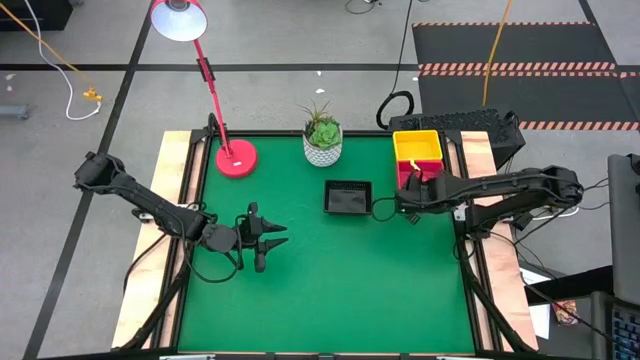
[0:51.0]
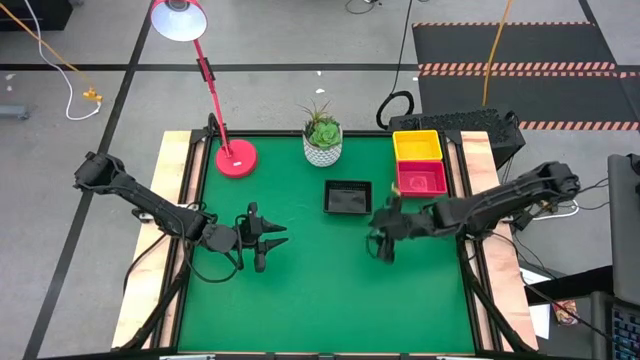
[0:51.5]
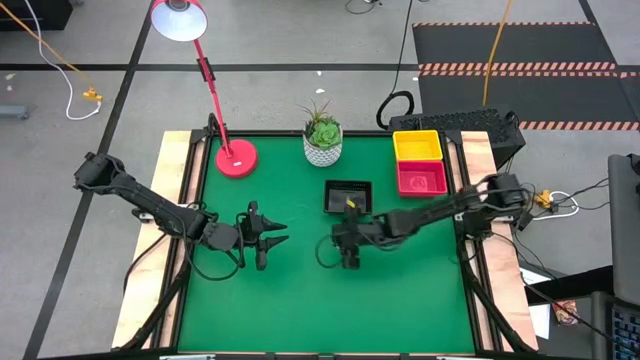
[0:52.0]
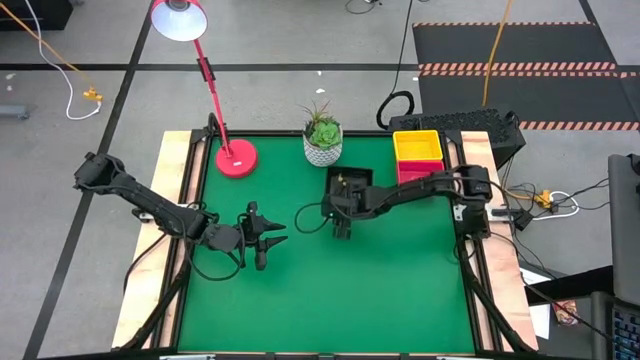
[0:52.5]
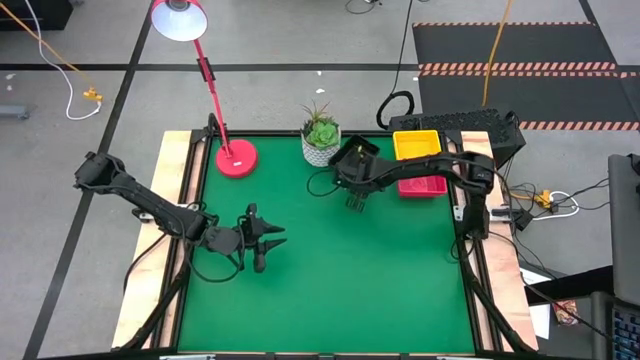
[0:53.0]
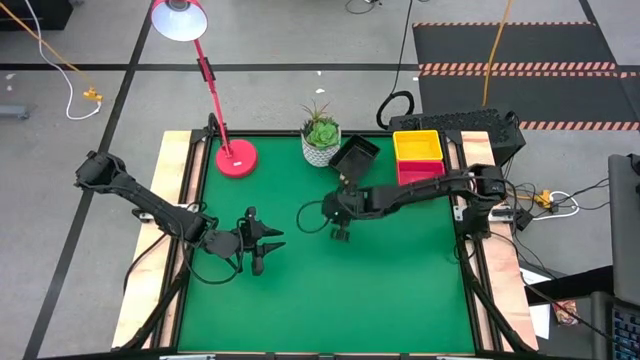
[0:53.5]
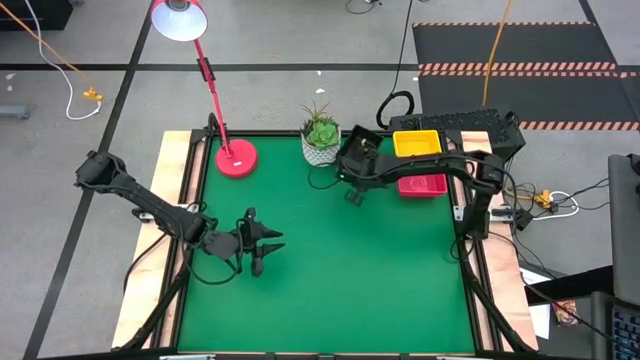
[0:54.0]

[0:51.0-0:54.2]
Move the stacked black bins to the top of the table

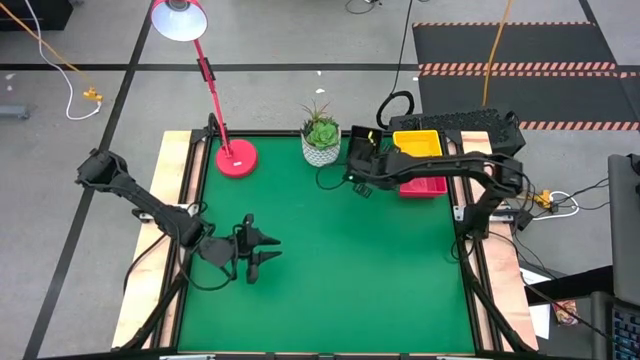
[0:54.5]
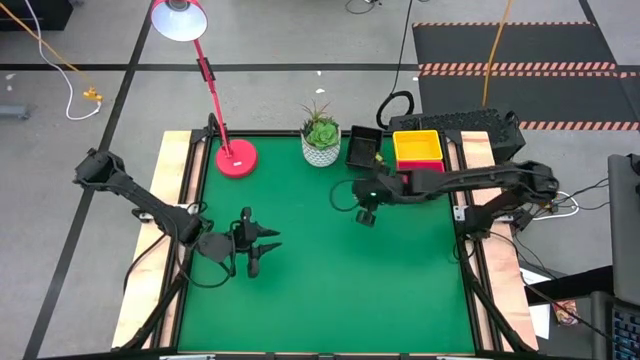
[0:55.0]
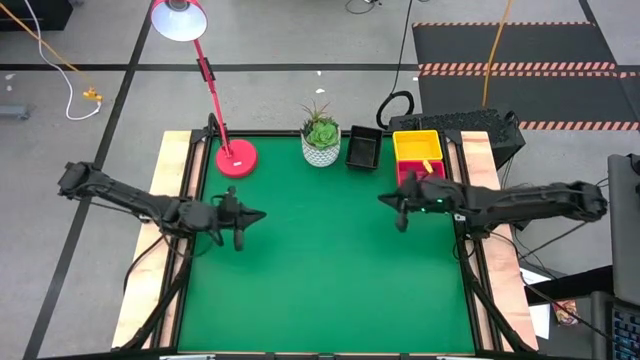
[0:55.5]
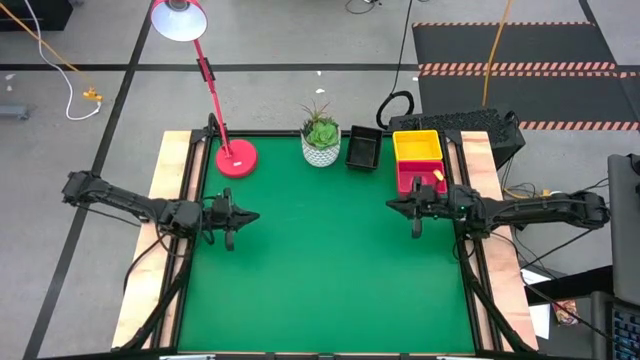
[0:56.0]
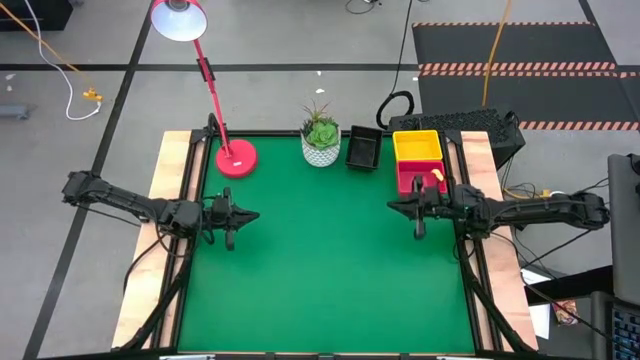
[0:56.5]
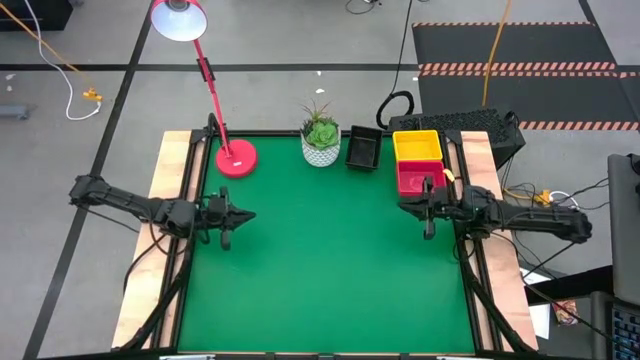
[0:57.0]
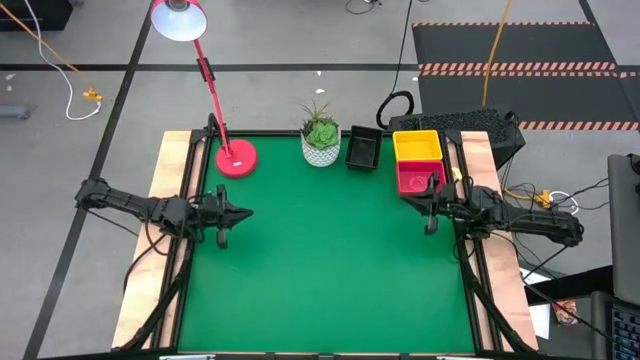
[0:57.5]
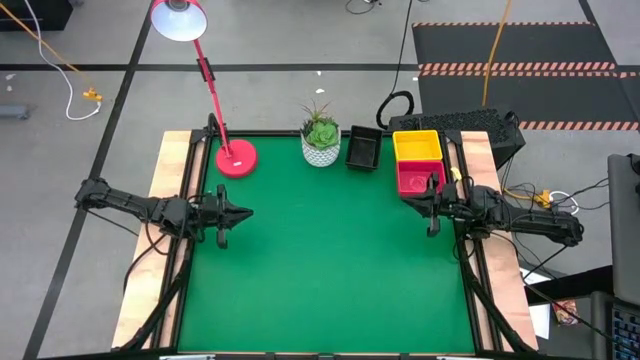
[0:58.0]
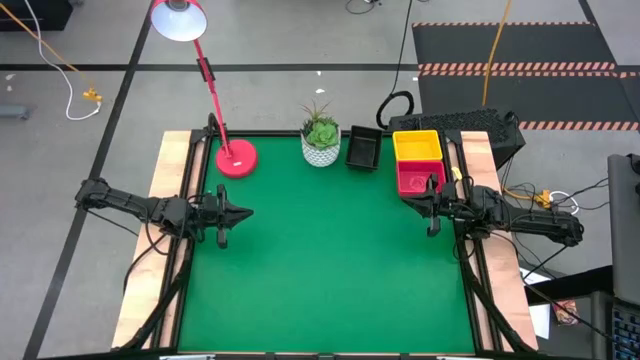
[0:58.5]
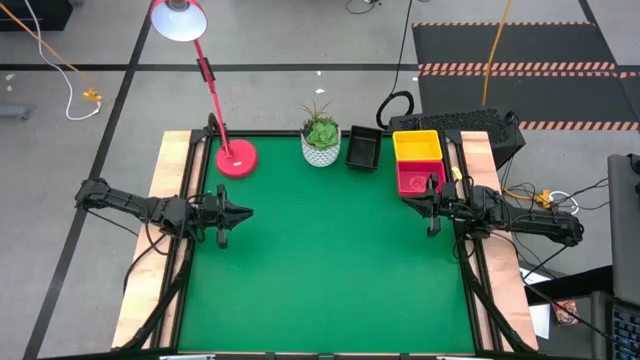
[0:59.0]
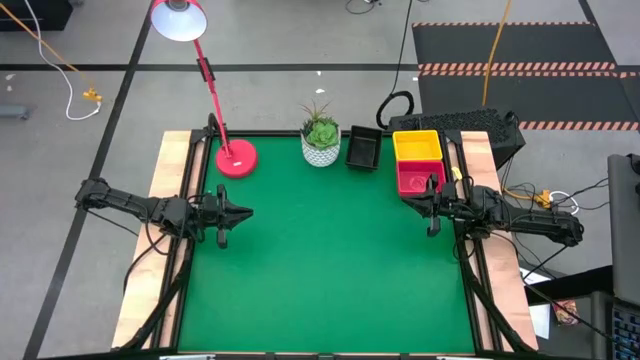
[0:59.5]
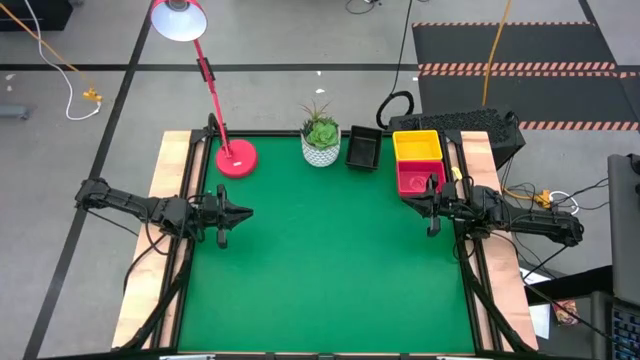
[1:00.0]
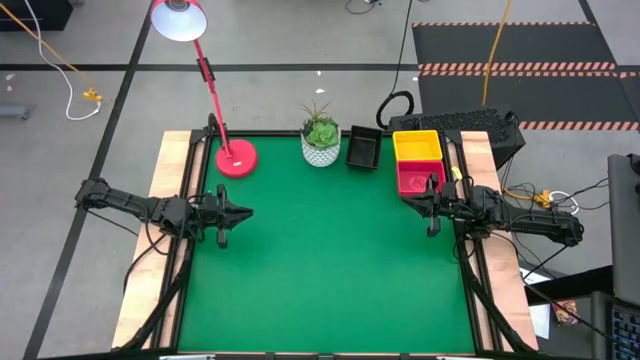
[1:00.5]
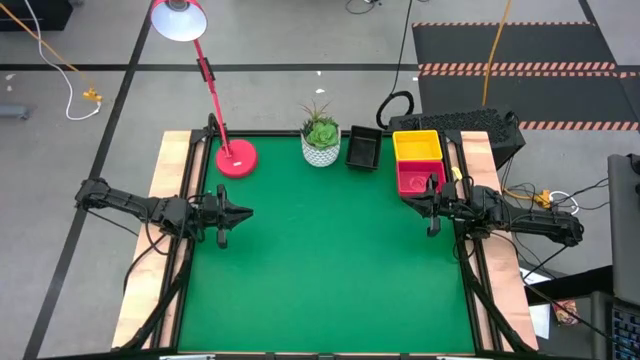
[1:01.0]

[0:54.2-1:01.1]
Return to Home Position

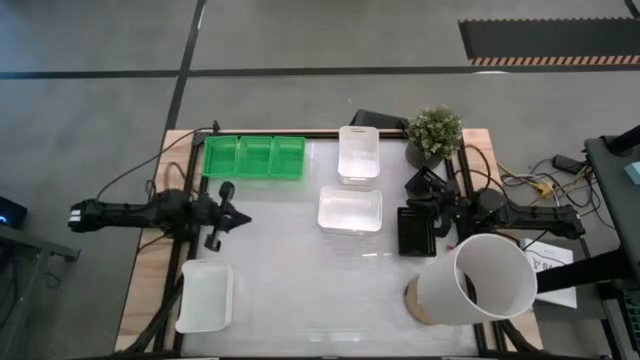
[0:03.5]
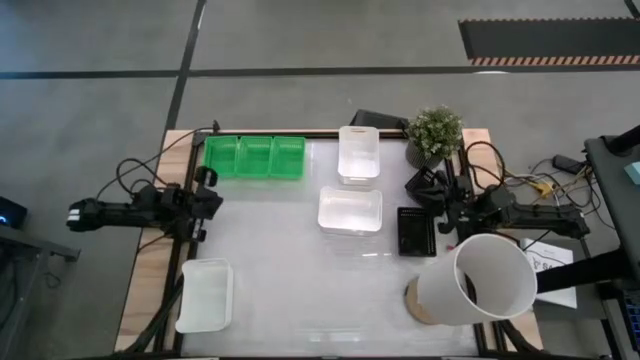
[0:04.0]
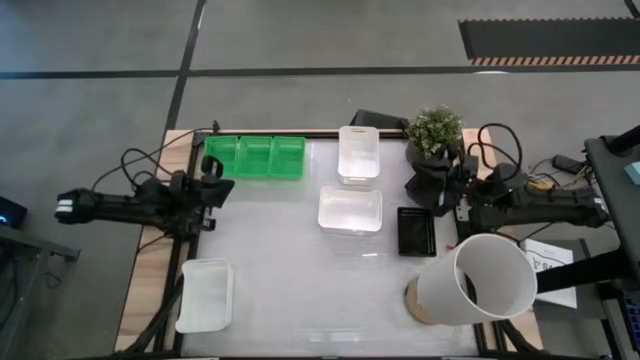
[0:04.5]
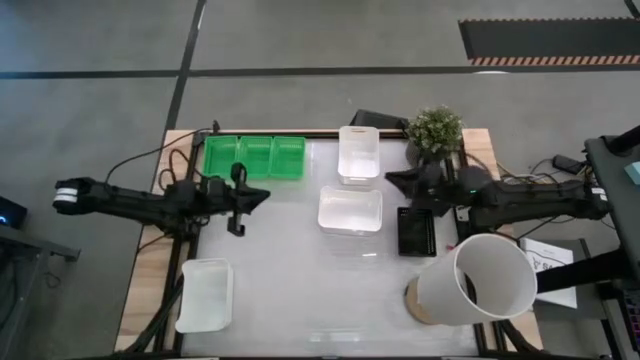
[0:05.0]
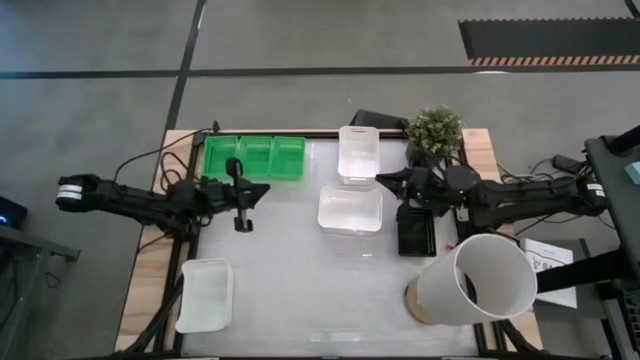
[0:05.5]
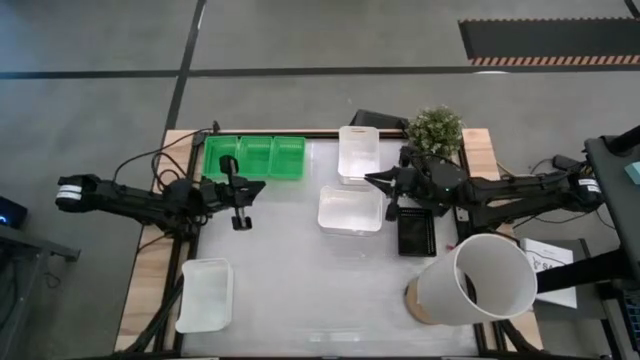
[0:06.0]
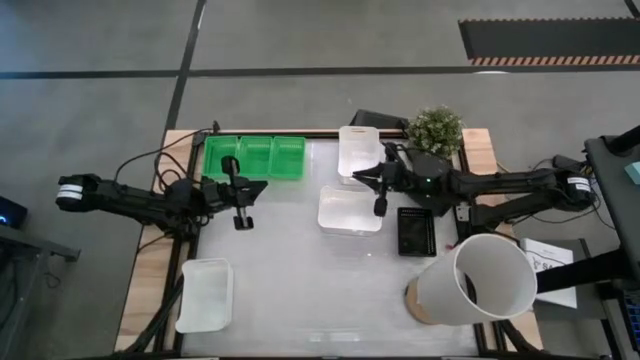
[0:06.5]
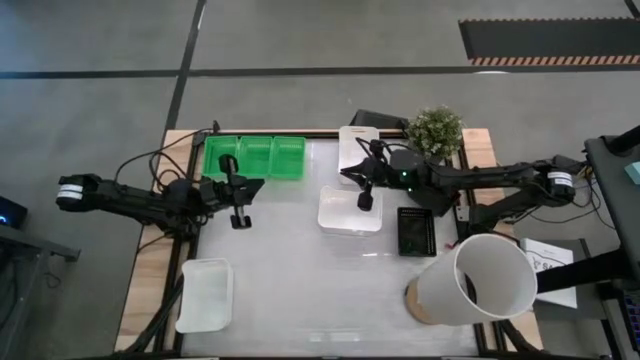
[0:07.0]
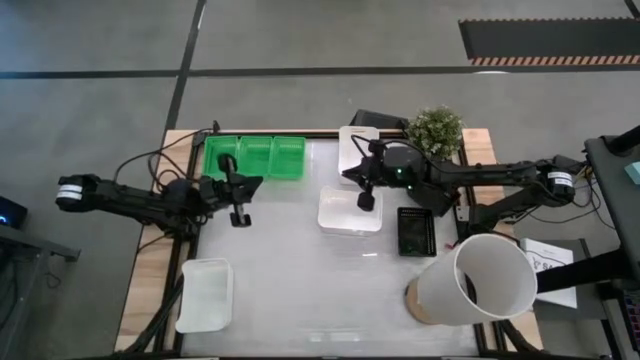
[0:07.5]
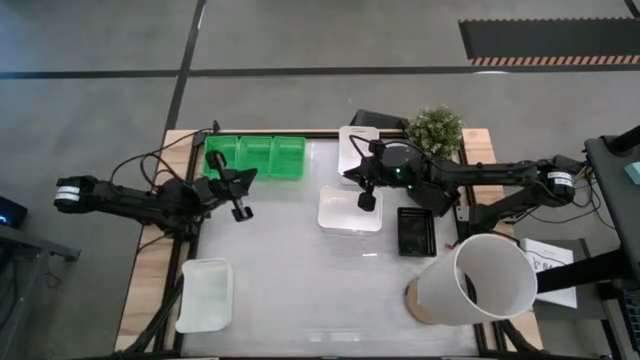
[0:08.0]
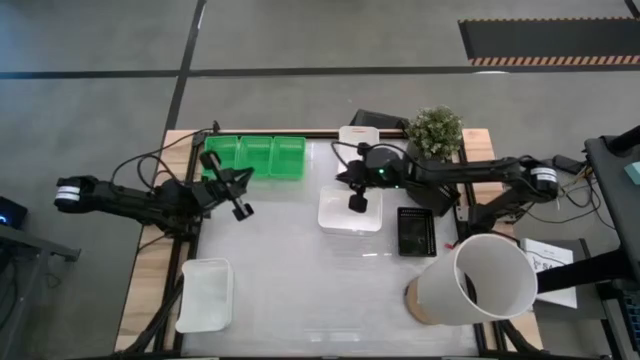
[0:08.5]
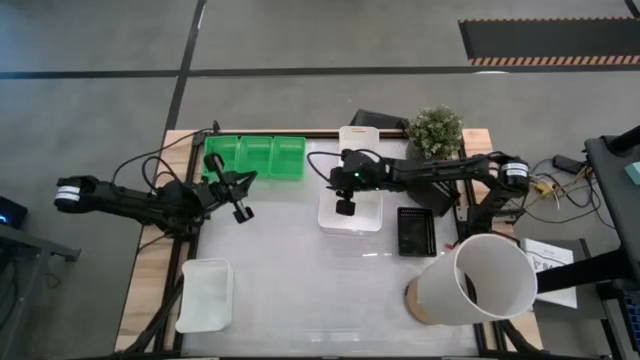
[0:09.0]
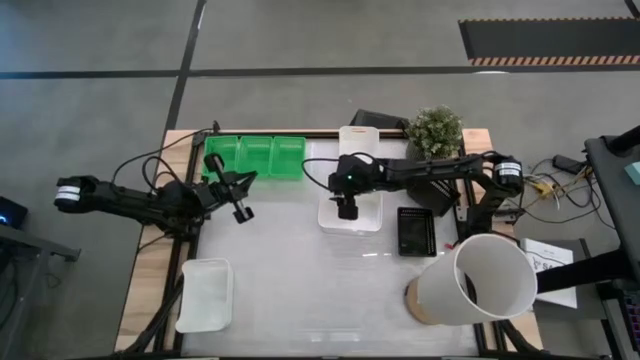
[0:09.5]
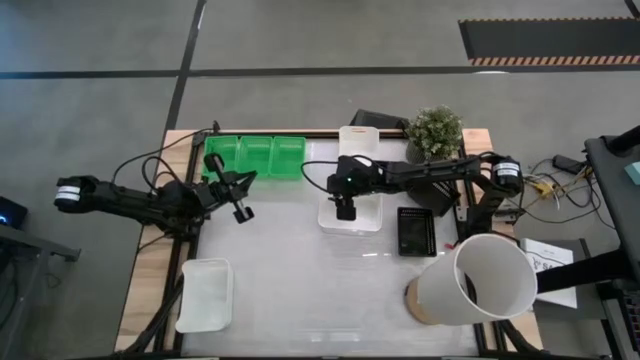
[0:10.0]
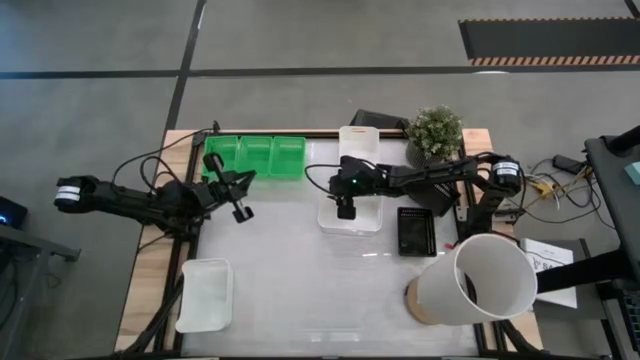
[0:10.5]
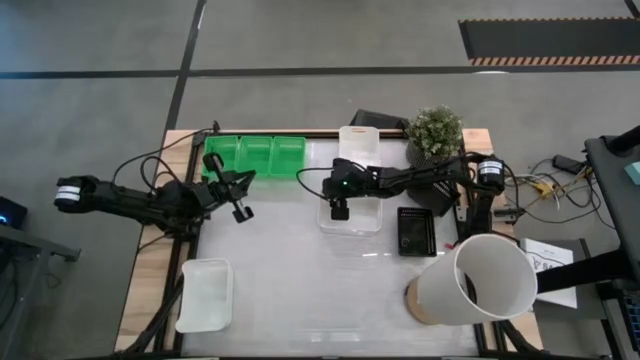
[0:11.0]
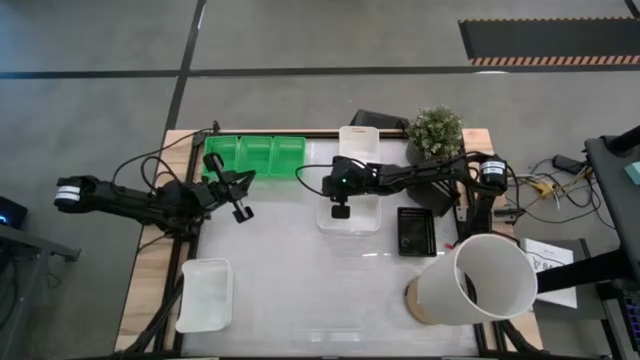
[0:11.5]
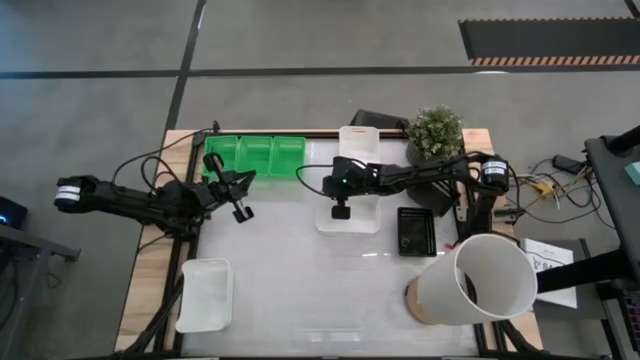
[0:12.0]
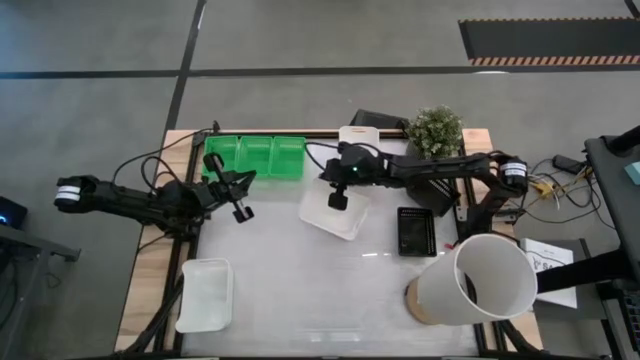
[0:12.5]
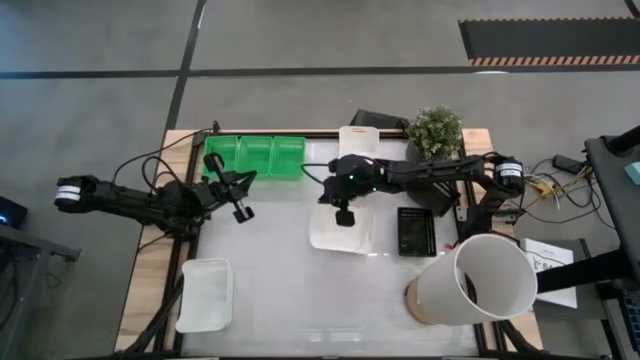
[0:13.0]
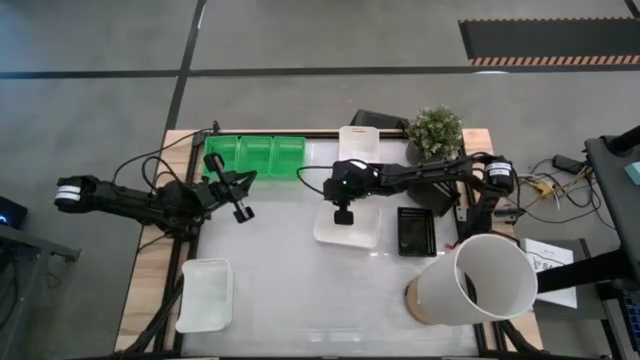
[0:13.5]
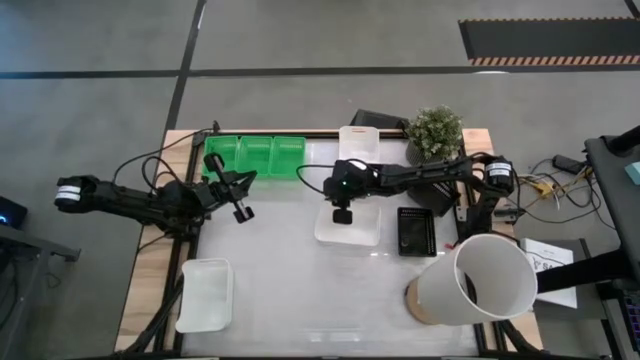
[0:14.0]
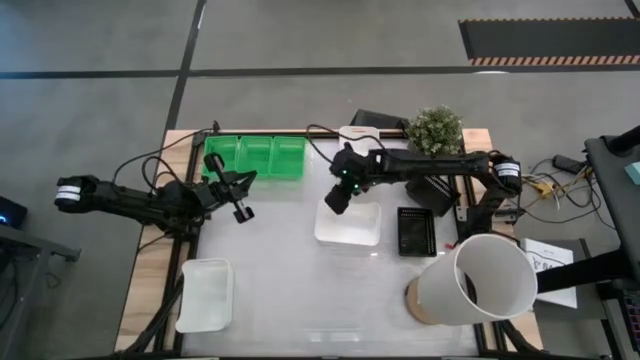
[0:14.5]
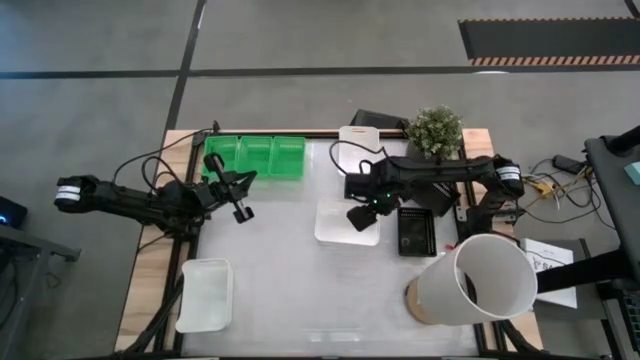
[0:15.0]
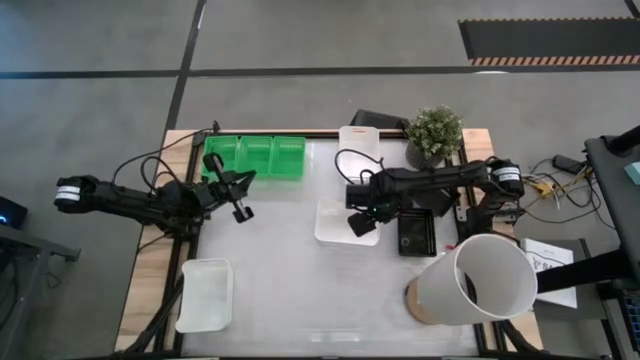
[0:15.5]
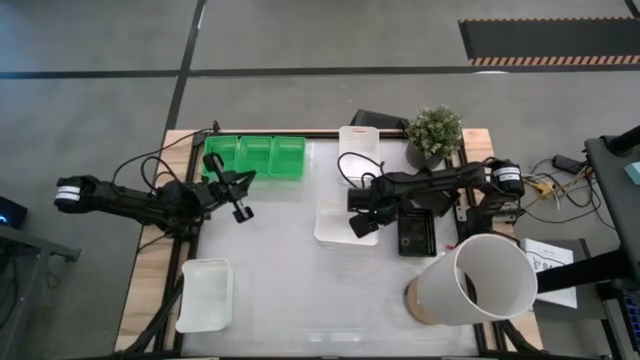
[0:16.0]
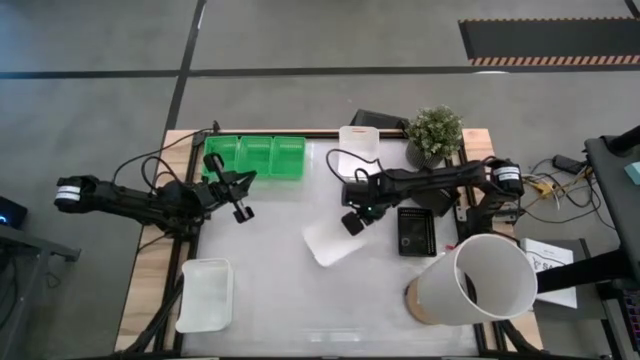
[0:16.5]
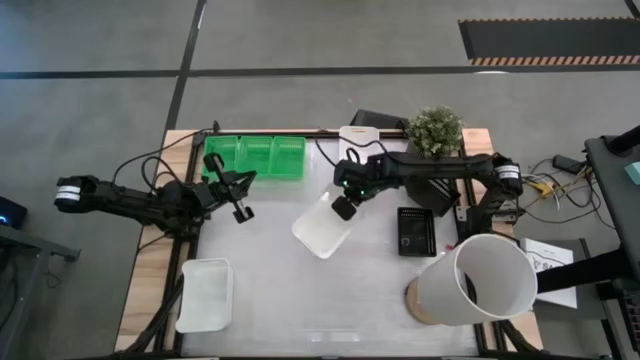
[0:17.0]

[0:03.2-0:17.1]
Stack the middle right white bin on top of the top white bin
